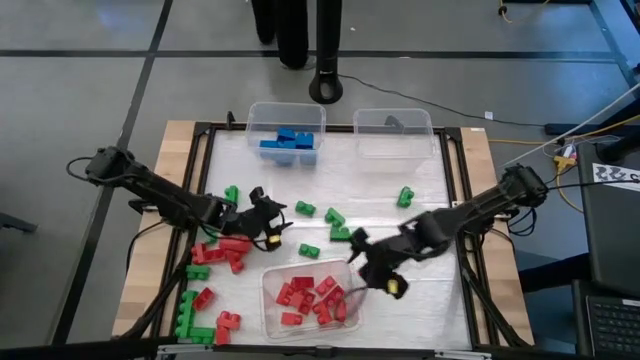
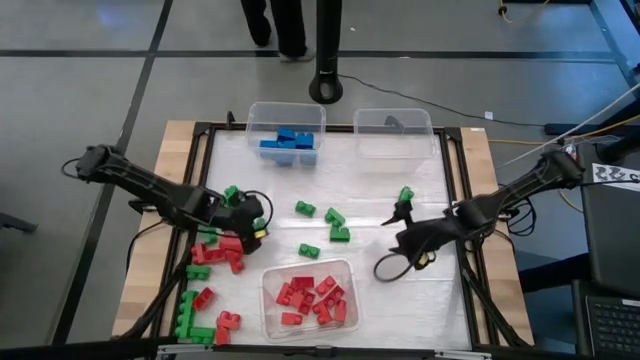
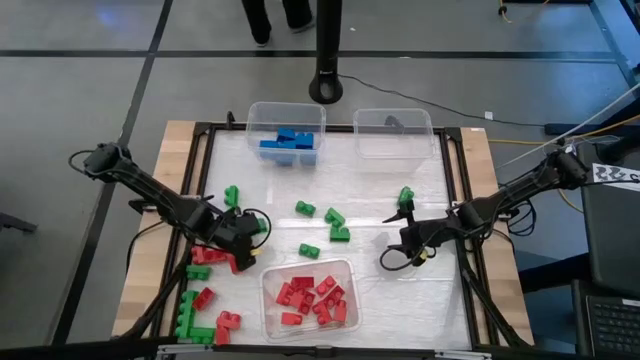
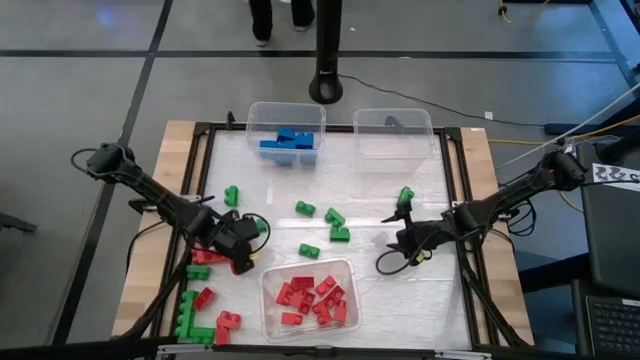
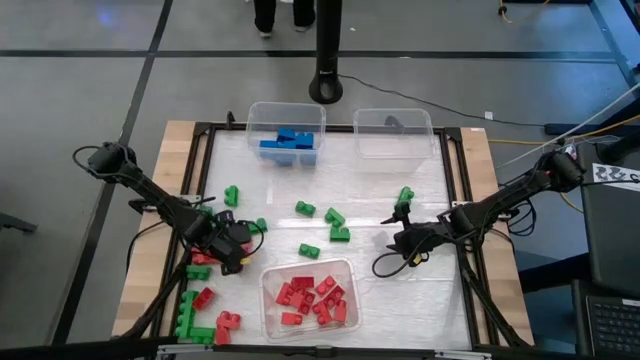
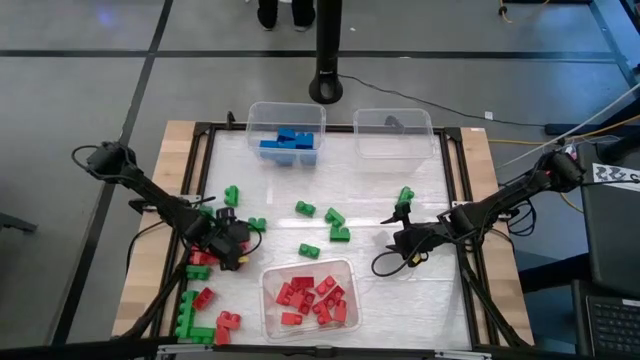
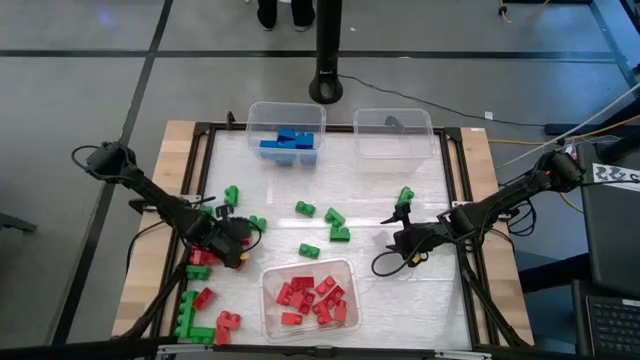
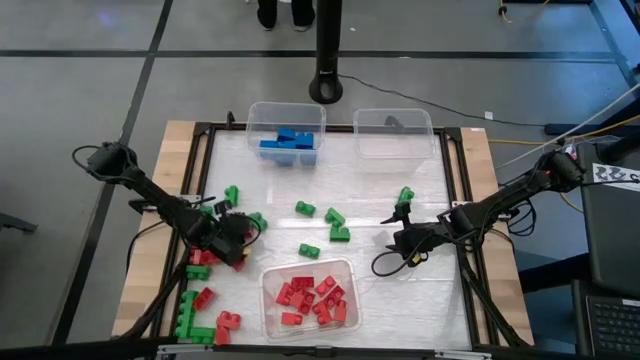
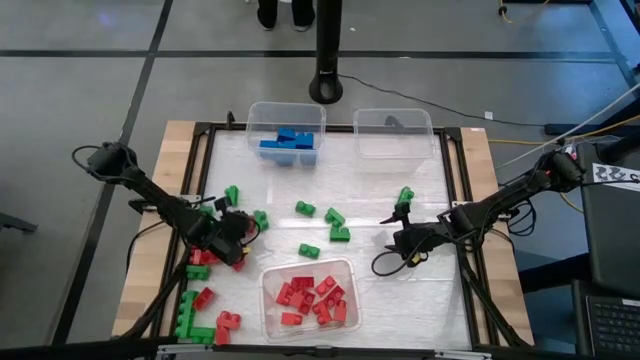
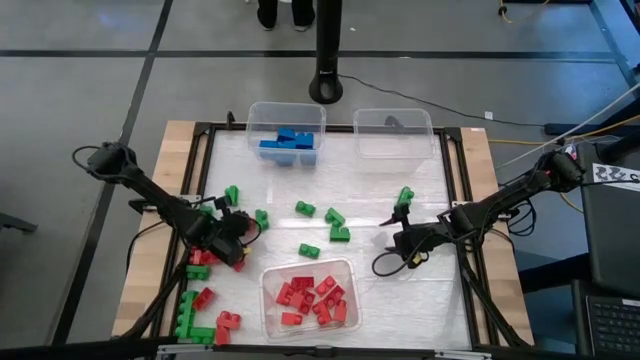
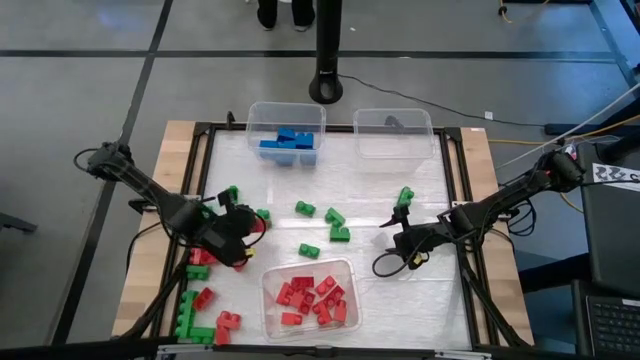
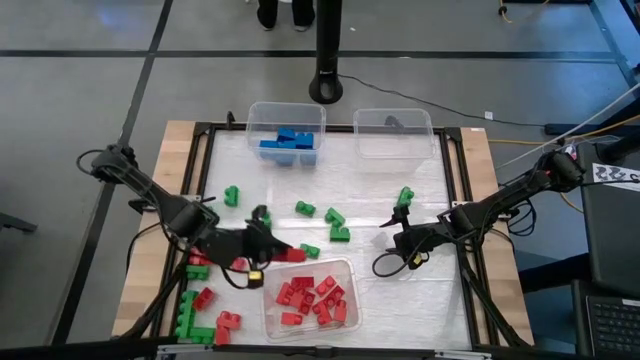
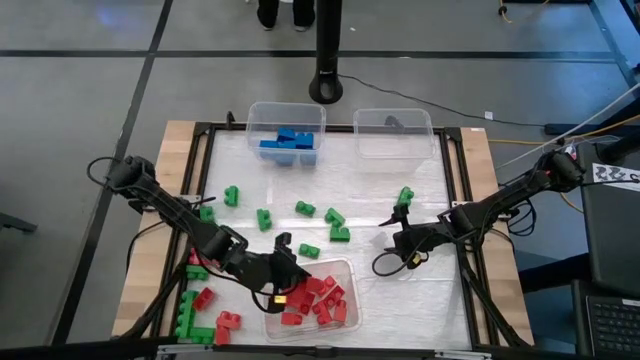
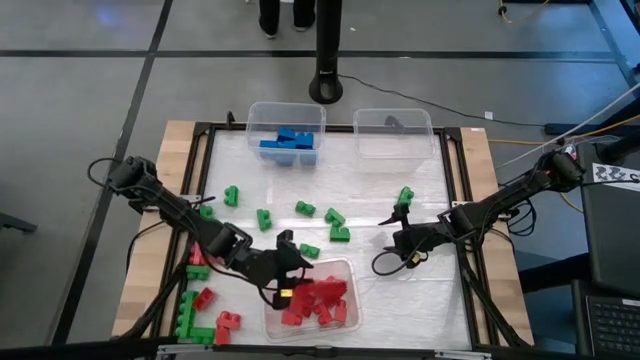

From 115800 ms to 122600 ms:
Task: Sort blocks
Put the red game piece into the bottom transparent bin

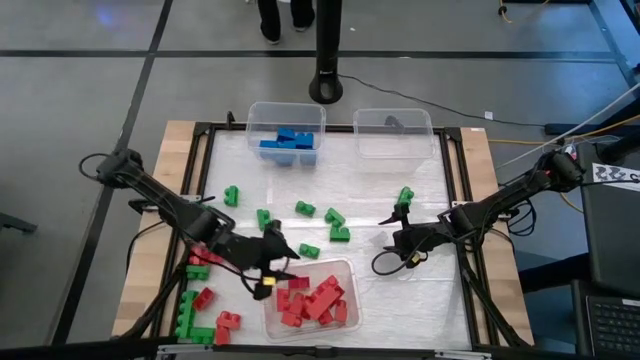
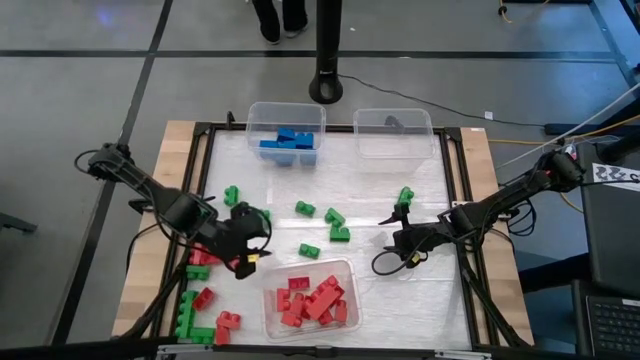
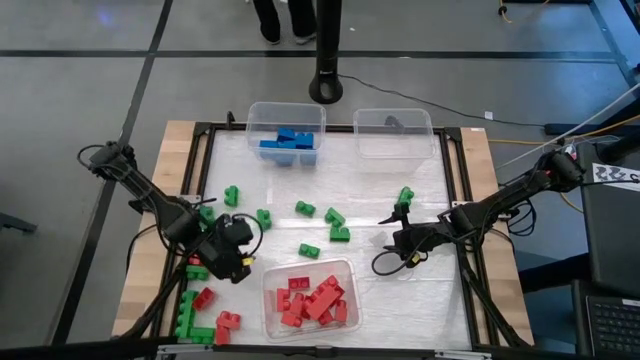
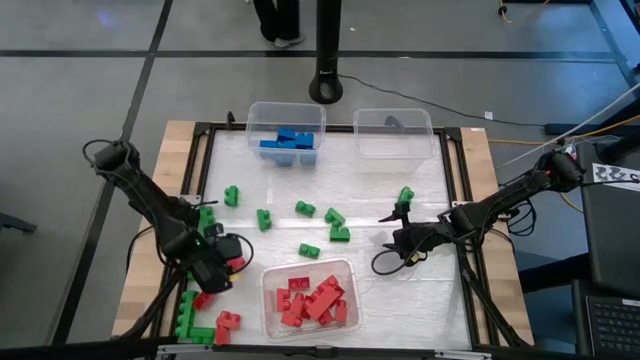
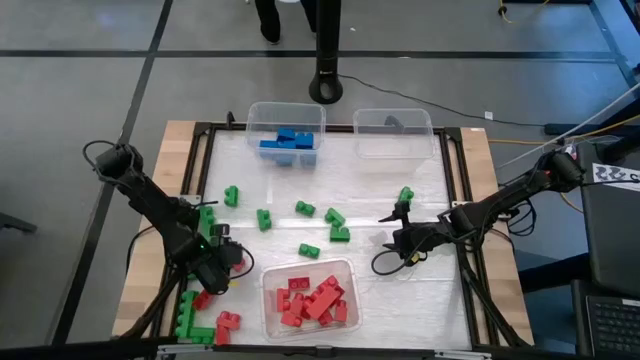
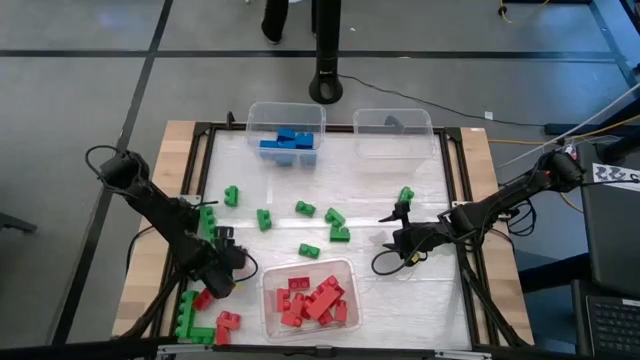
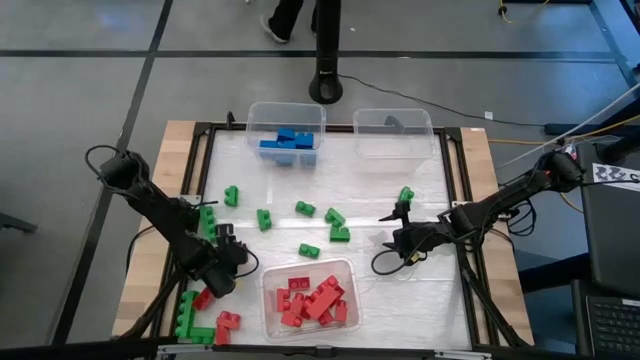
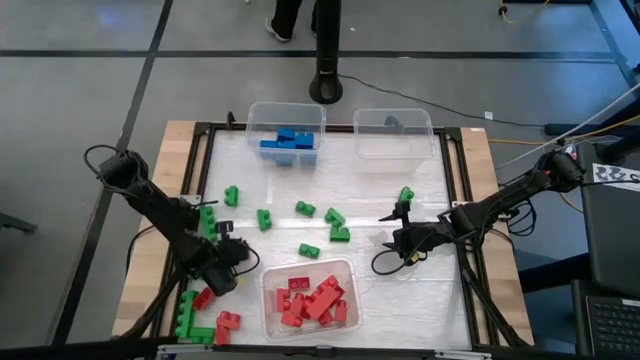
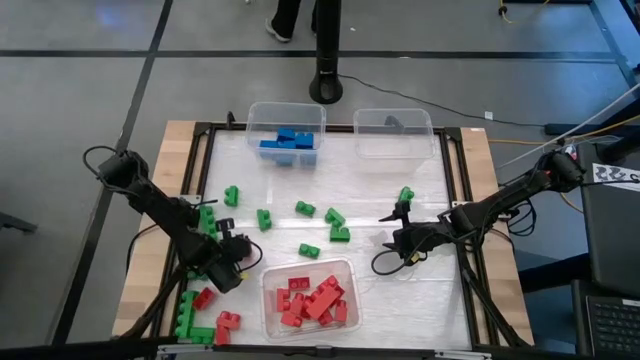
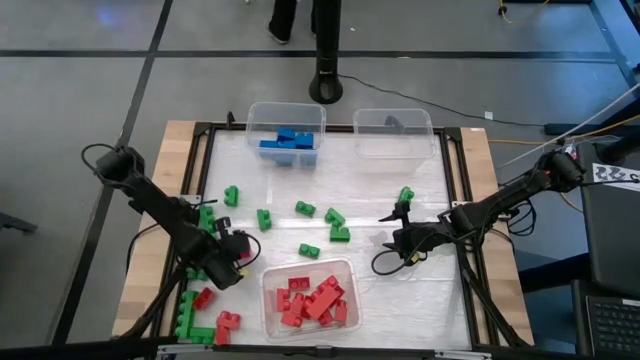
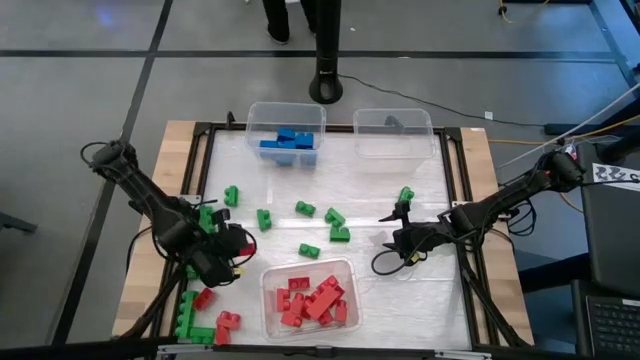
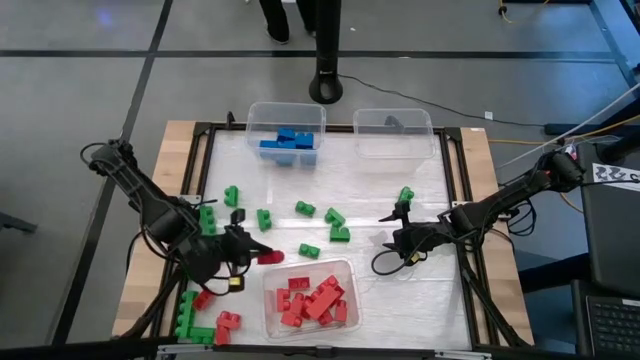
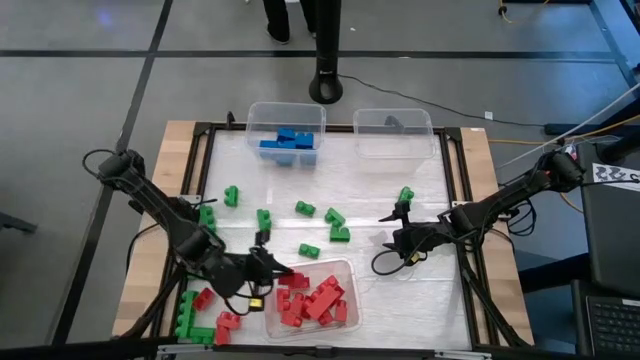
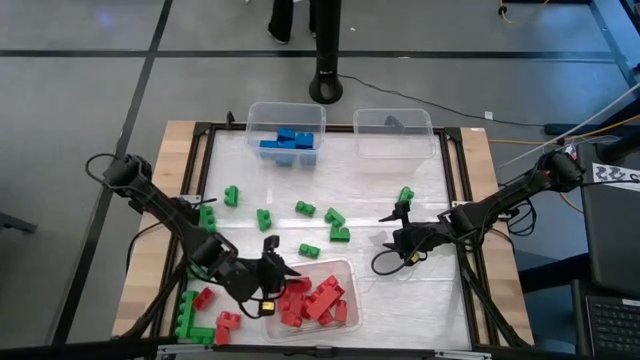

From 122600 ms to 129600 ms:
Put the red game piece into the bottom transparent bin

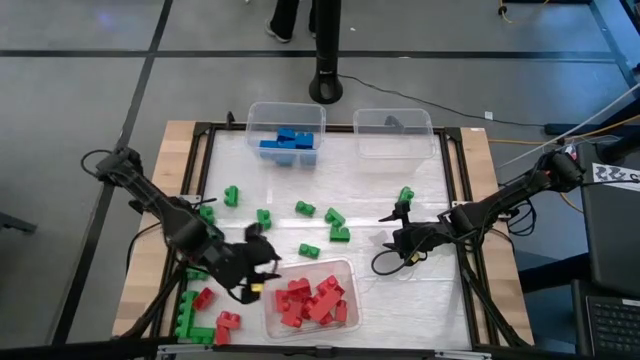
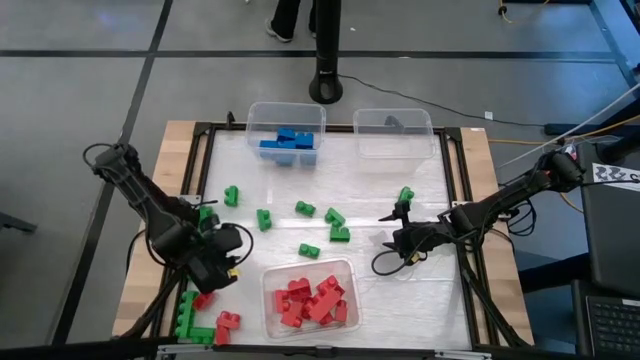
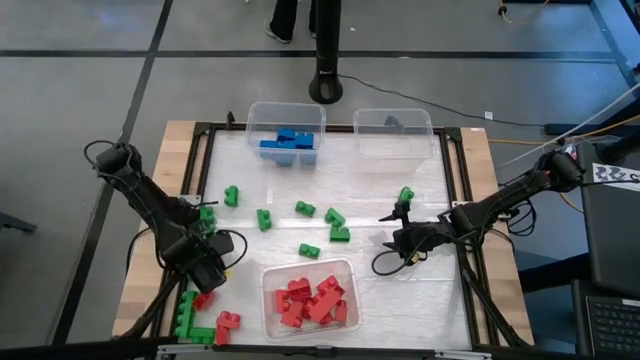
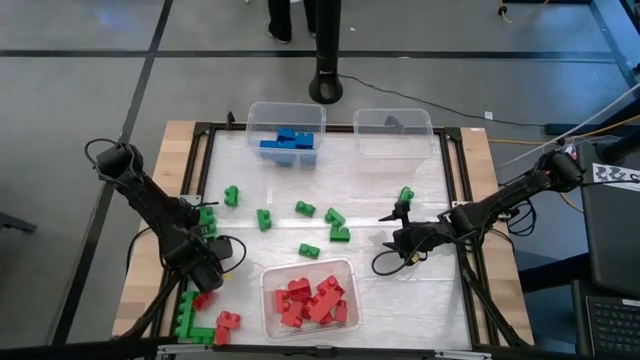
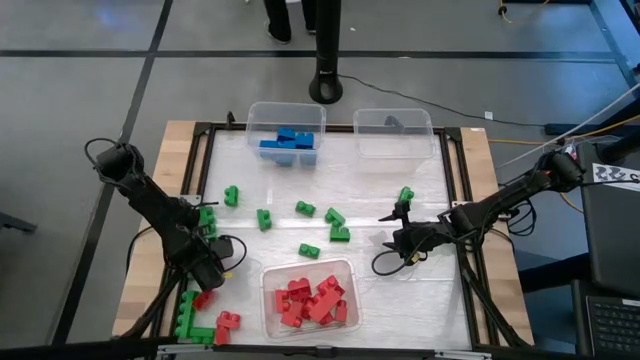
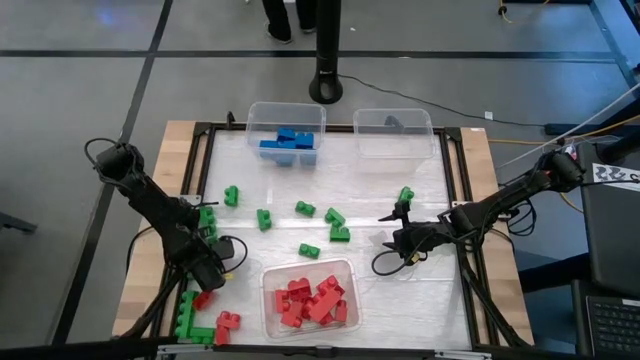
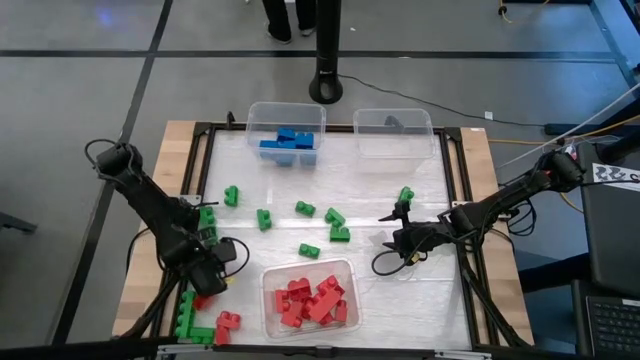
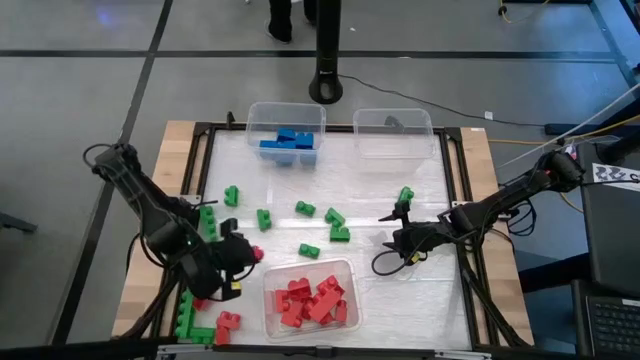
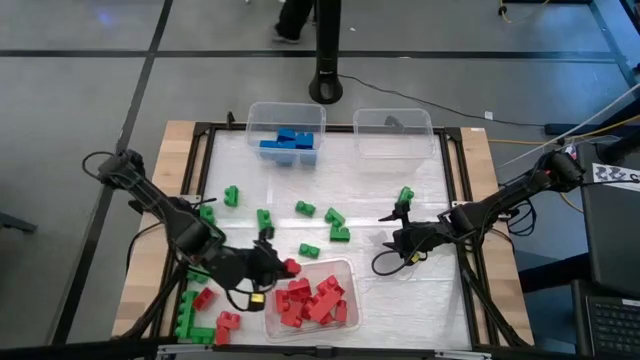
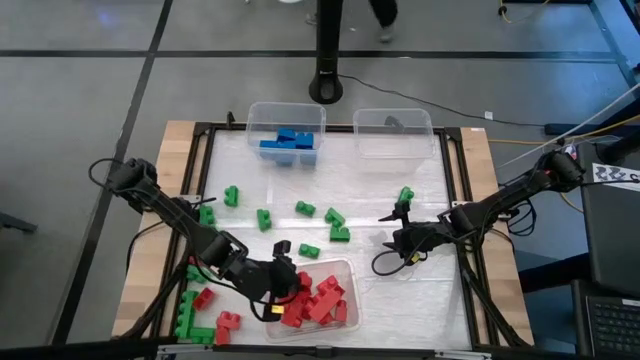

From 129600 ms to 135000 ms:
Put the red game piece into the bottom transparent bin
